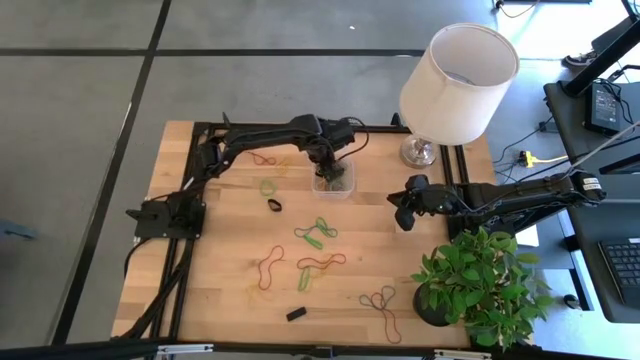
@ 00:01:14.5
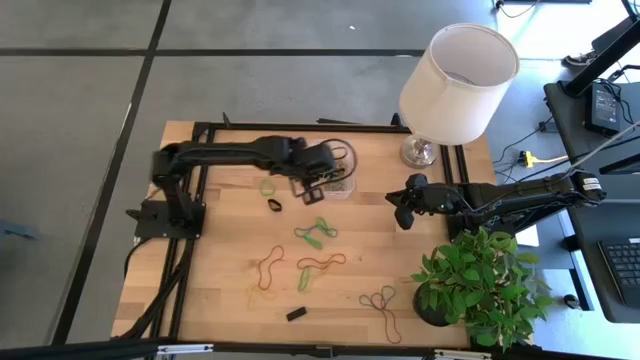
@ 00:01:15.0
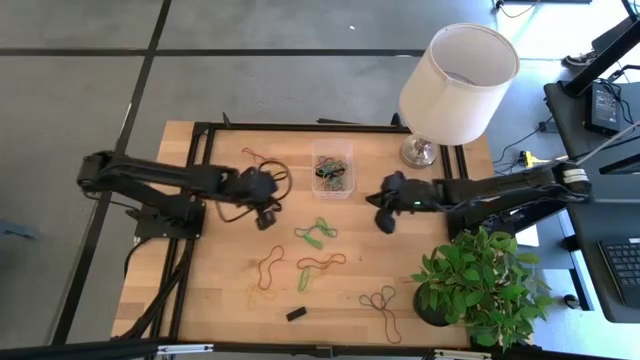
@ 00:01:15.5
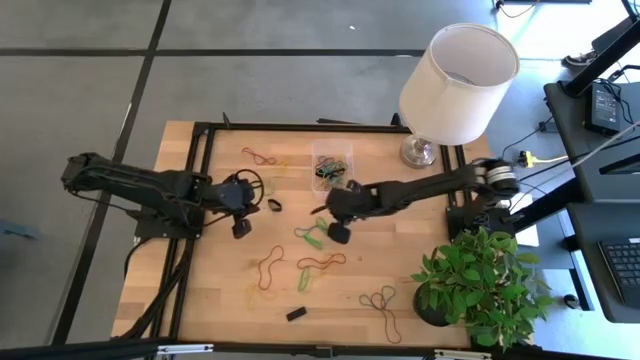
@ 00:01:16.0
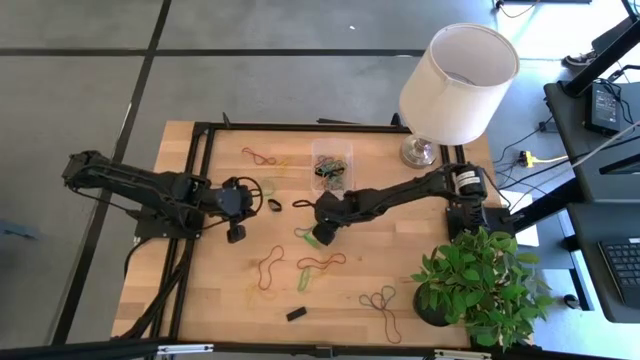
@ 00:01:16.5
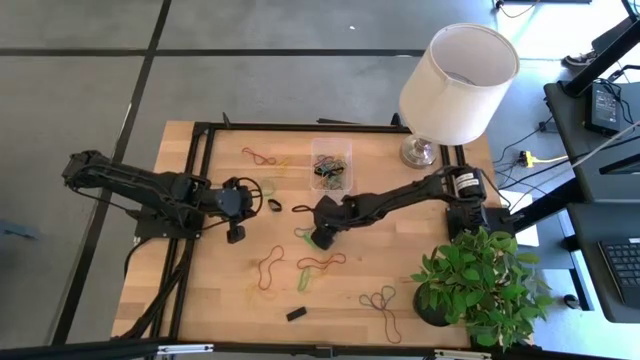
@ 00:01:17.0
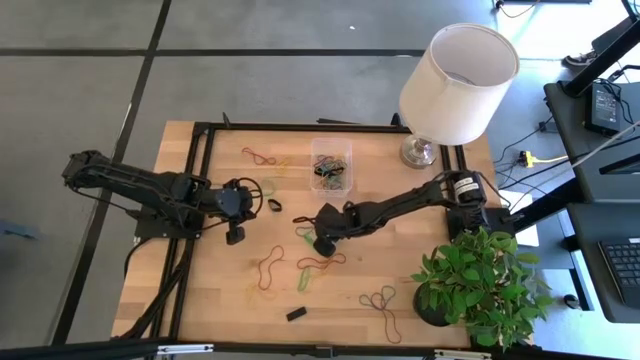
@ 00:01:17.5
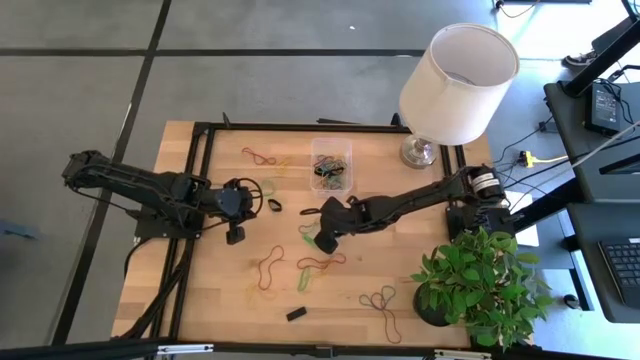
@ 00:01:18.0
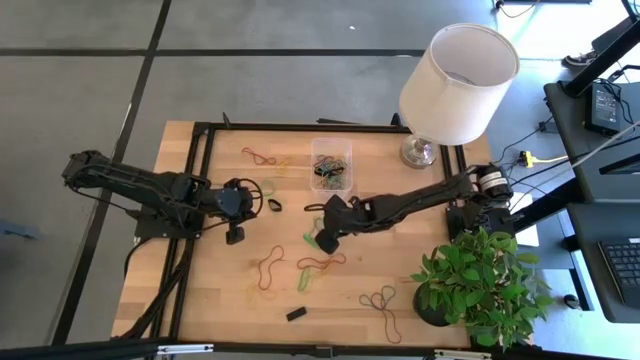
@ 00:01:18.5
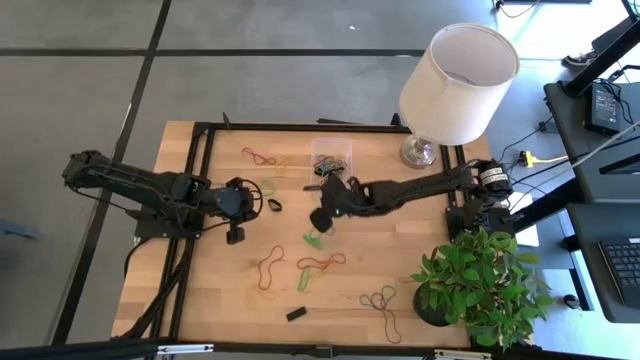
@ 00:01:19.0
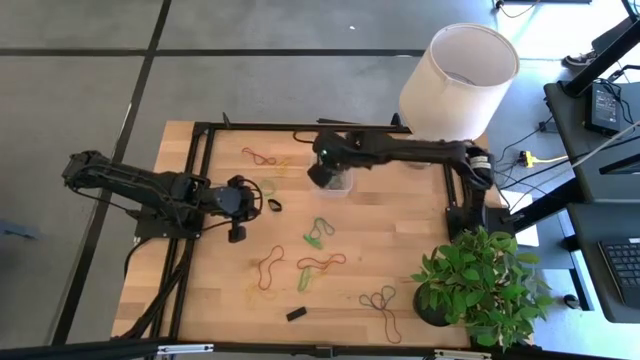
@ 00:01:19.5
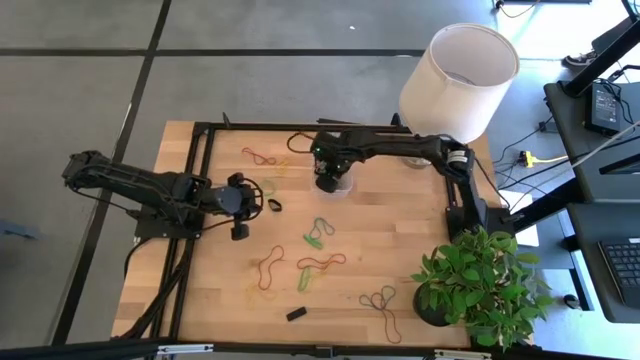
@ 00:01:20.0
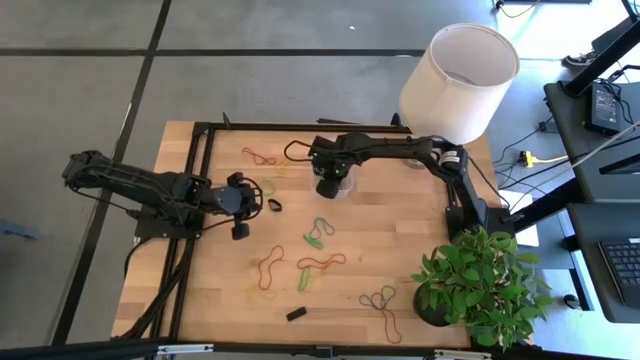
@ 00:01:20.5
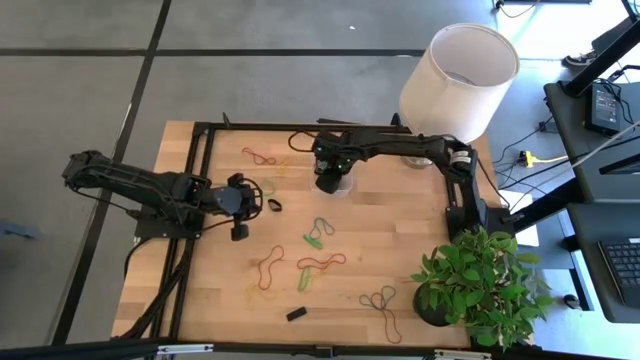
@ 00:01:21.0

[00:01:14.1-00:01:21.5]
Task: Pick and place rubber bands into bin
Put the green rubber band into the transparent bin

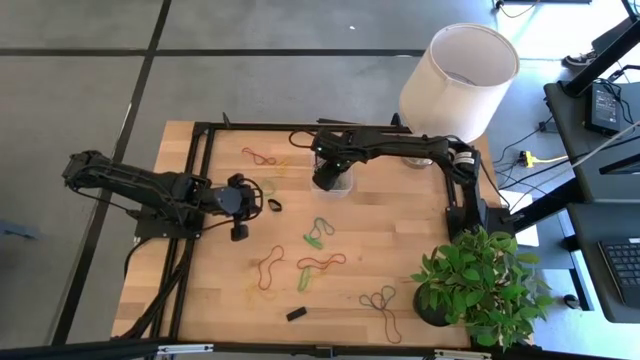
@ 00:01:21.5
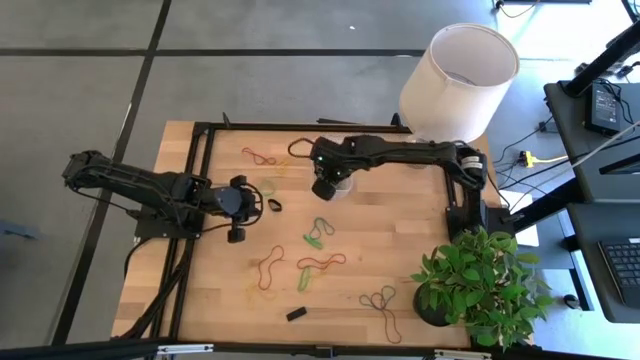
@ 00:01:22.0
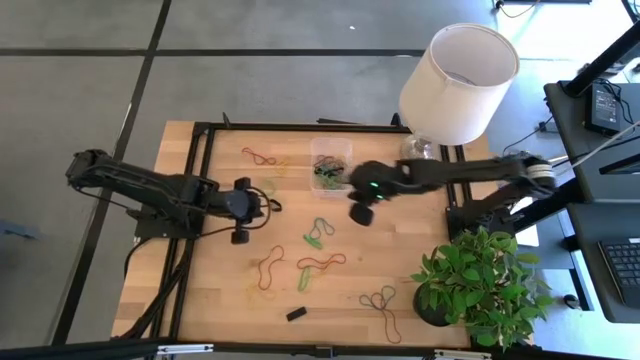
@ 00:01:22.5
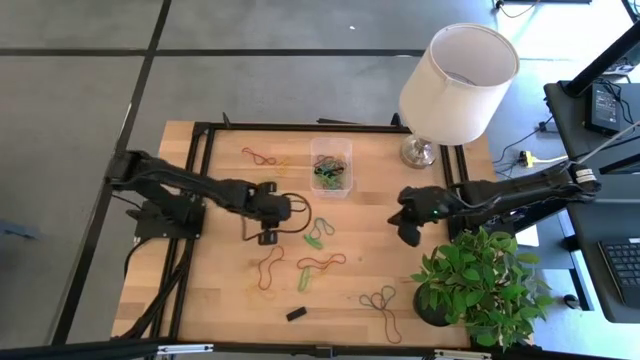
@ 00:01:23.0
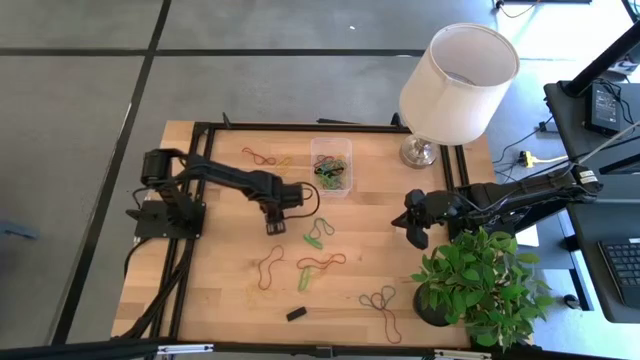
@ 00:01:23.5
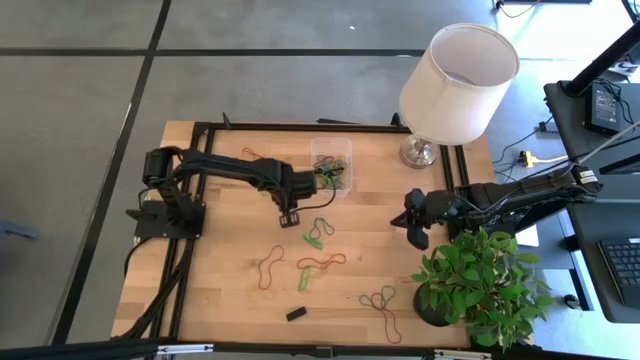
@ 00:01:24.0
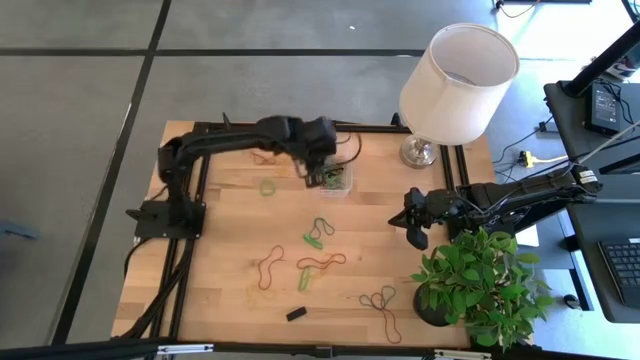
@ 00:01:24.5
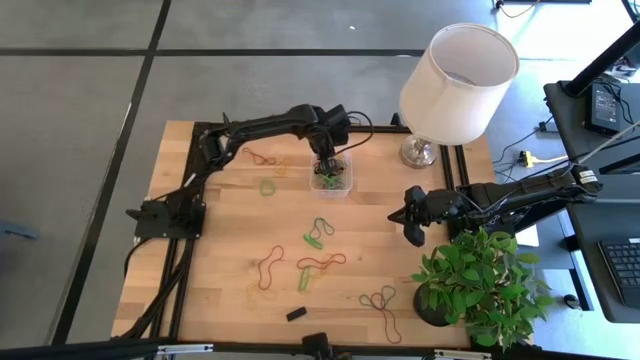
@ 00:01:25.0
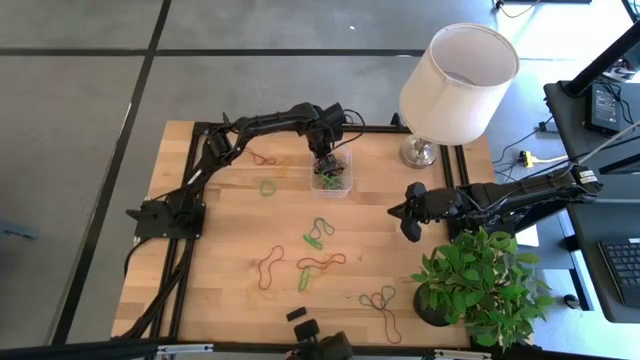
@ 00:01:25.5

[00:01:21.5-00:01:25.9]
Put the black rubber band into the transparent bin

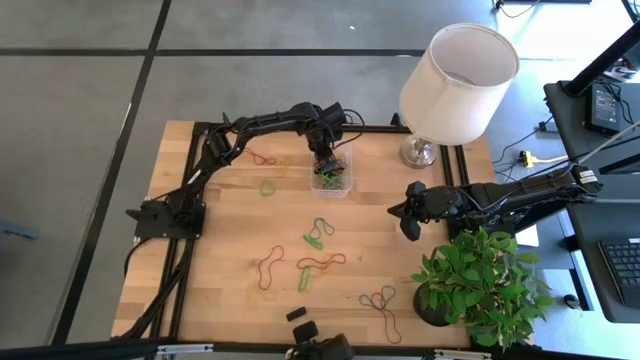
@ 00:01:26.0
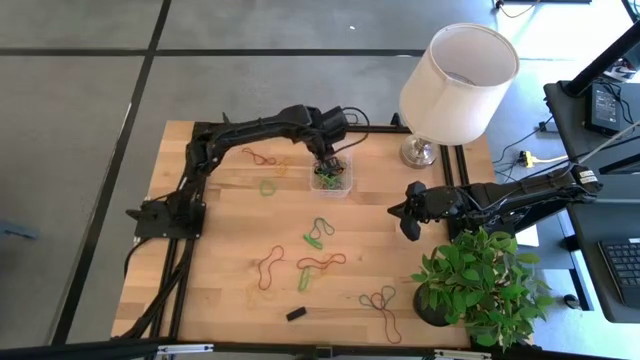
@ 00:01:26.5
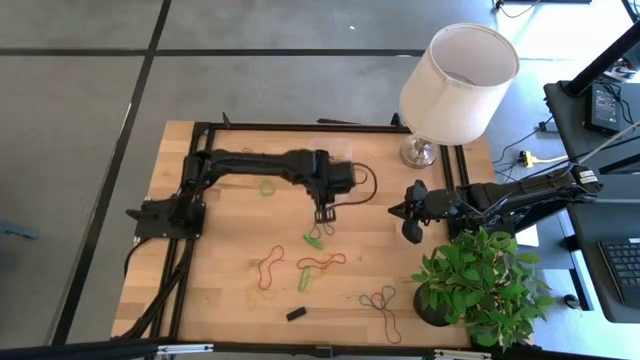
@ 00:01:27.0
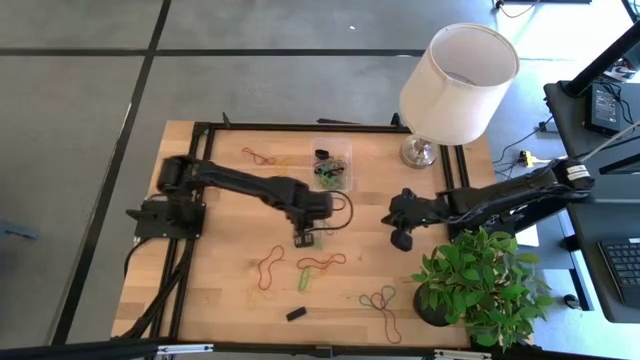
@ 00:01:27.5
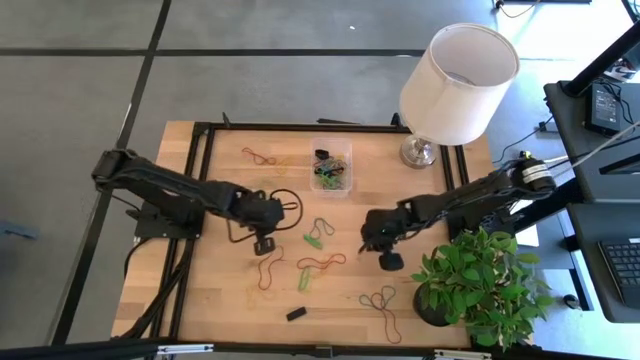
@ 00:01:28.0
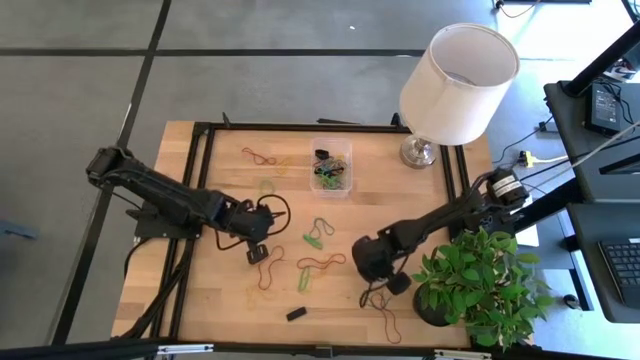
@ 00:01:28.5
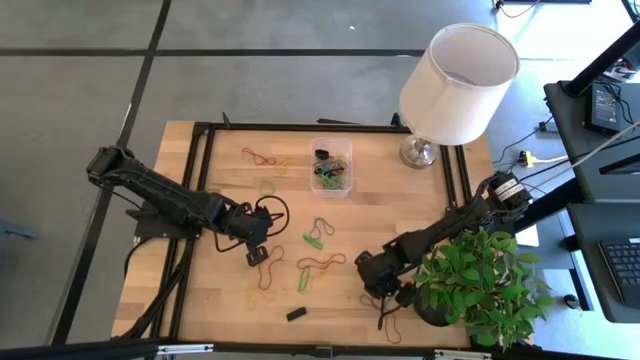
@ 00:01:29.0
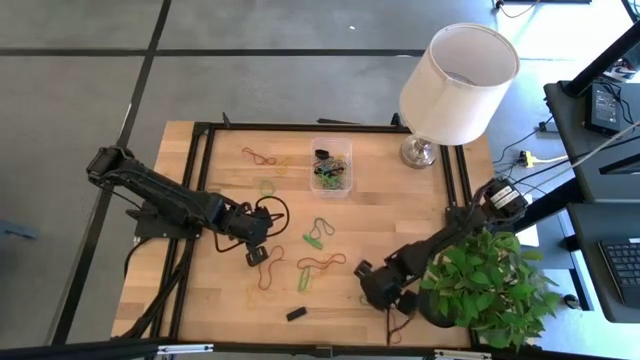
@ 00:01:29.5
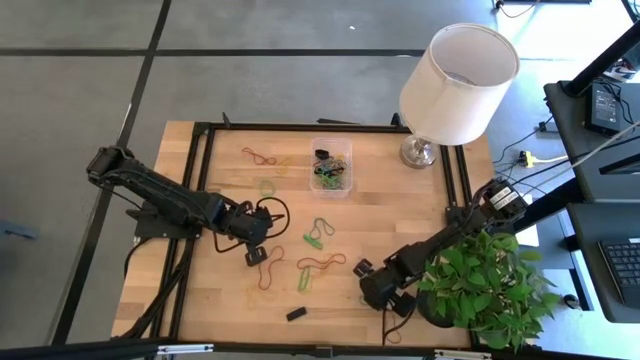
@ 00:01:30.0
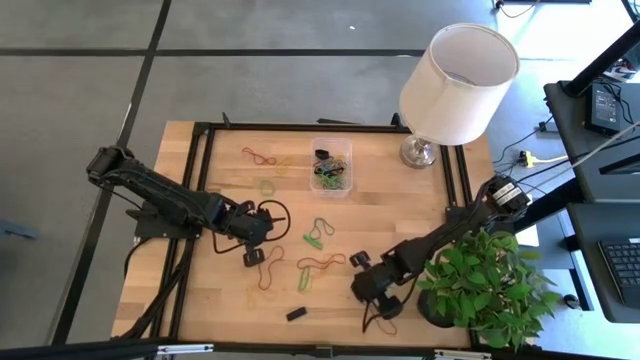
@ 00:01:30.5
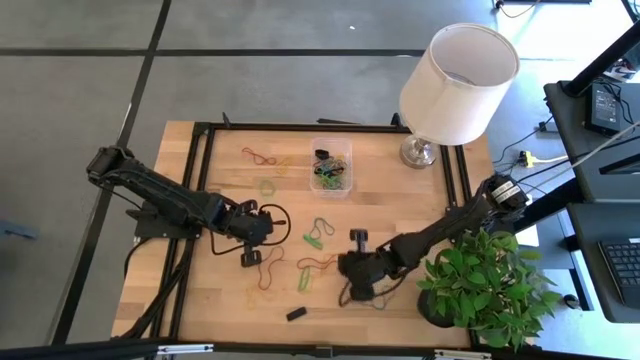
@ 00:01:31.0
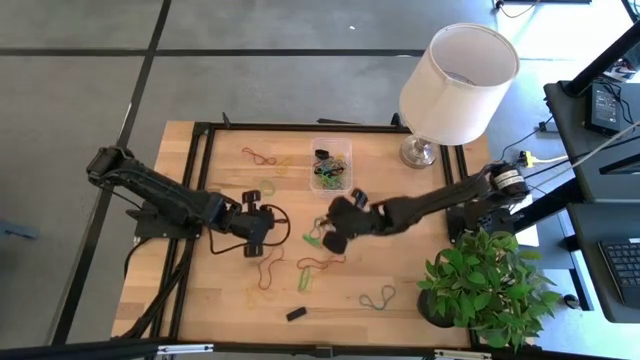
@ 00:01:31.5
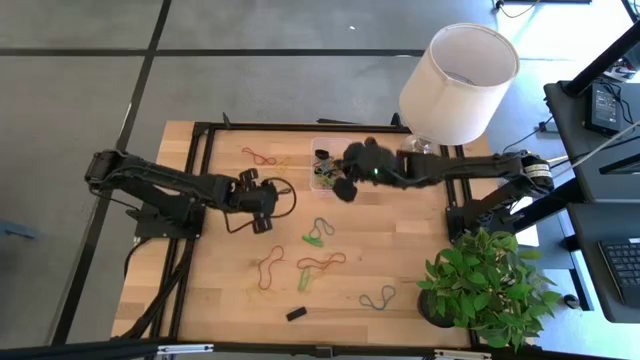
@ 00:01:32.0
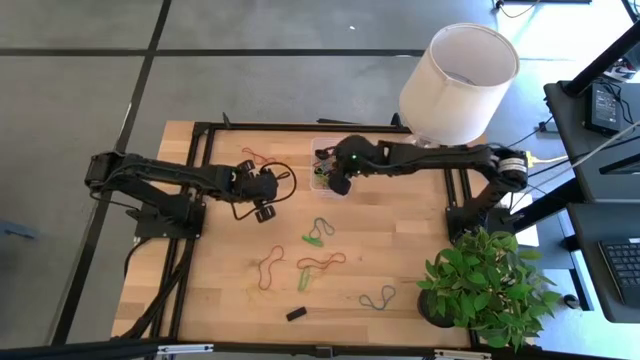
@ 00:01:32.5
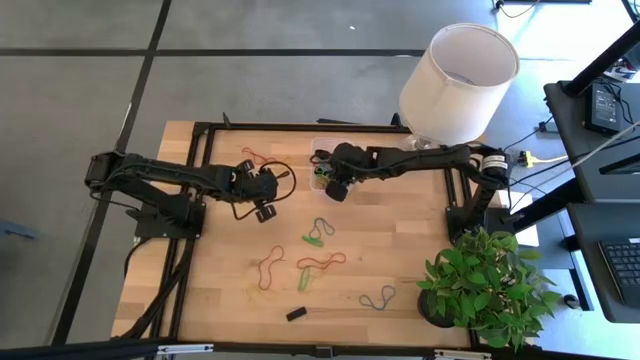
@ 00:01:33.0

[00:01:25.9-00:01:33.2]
Put the red rubber band into the transparent bin

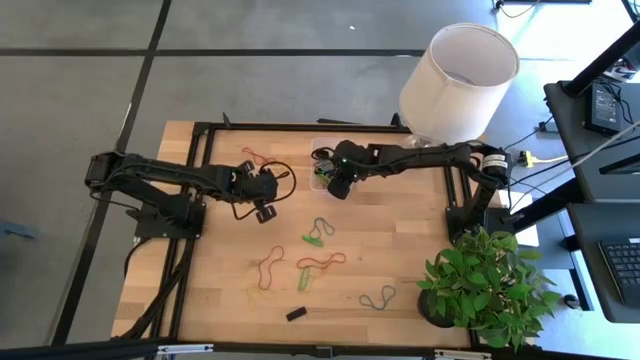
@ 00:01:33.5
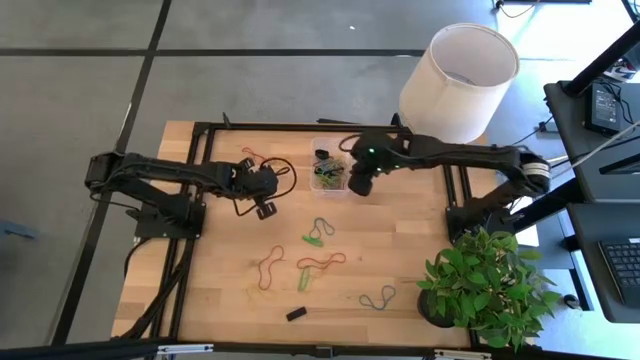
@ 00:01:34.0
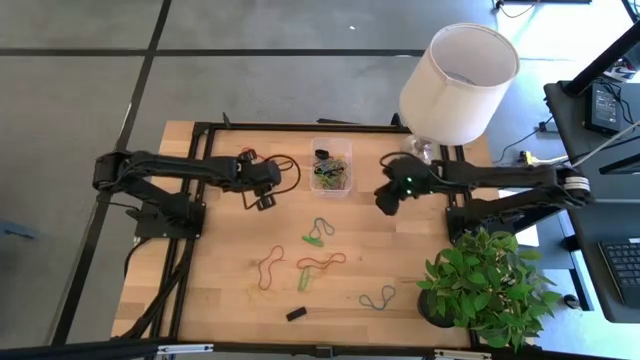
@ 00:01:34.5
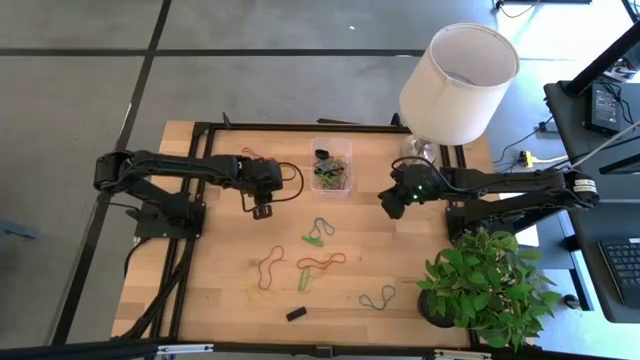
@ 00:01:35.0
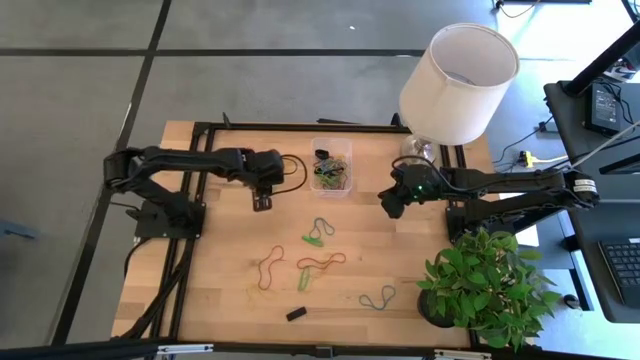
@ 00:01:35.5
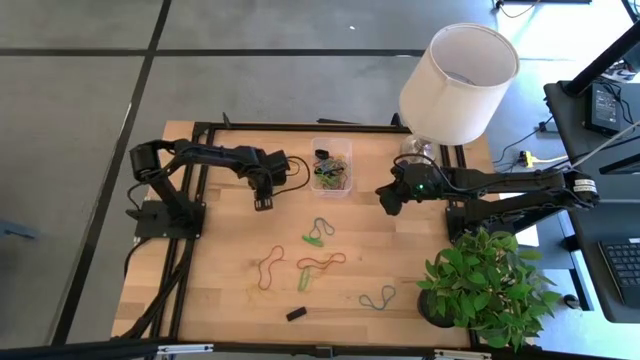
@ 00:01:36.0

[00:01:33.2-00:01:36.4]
Put the green rubber band into the transparent bin
